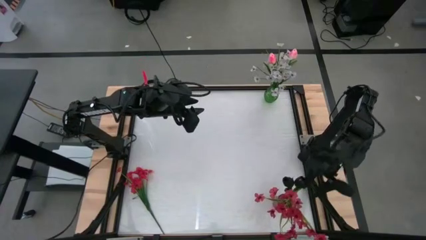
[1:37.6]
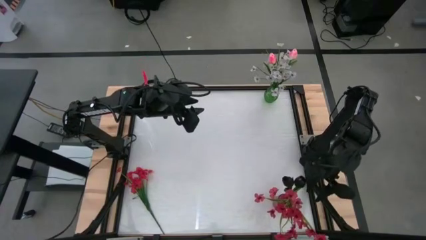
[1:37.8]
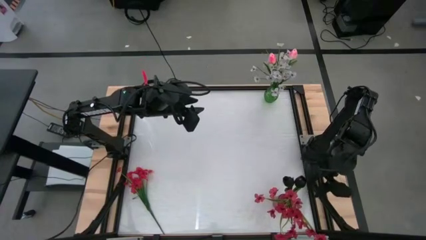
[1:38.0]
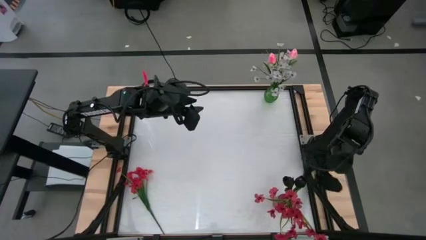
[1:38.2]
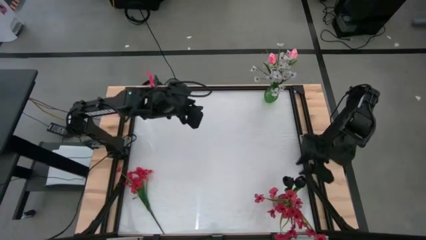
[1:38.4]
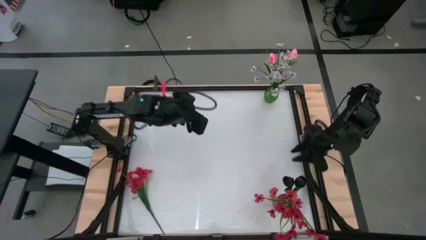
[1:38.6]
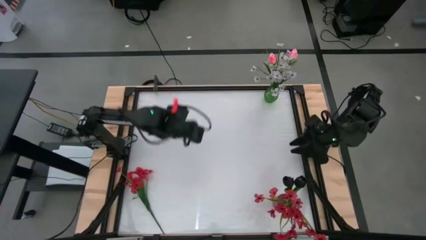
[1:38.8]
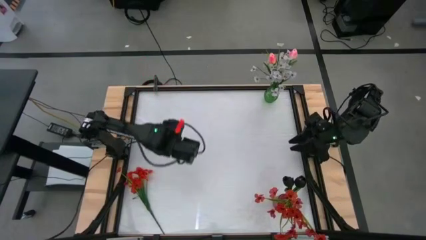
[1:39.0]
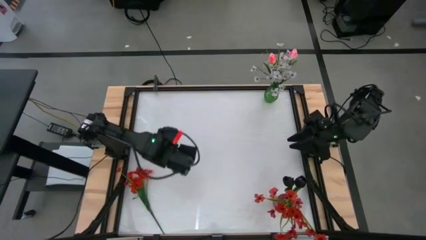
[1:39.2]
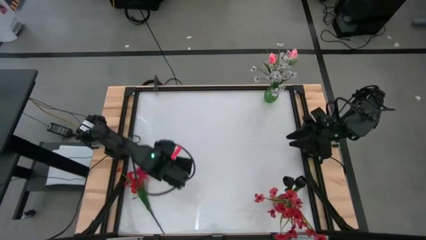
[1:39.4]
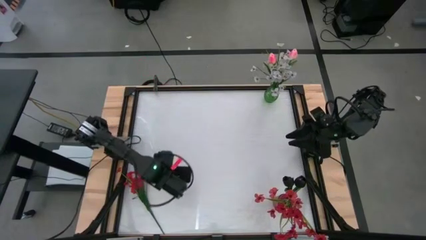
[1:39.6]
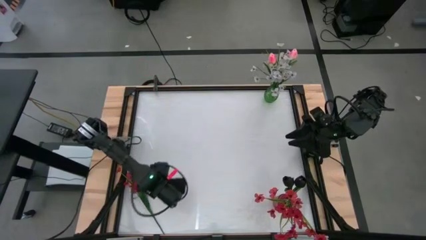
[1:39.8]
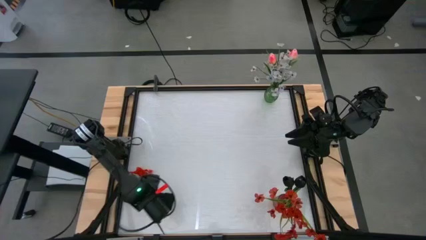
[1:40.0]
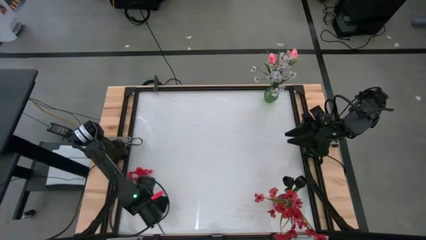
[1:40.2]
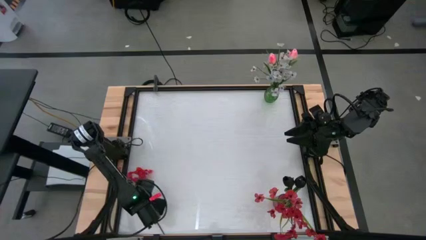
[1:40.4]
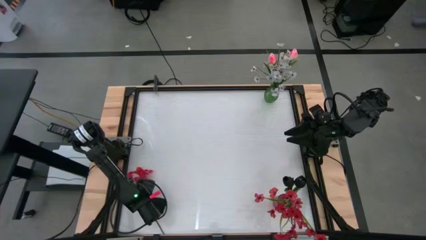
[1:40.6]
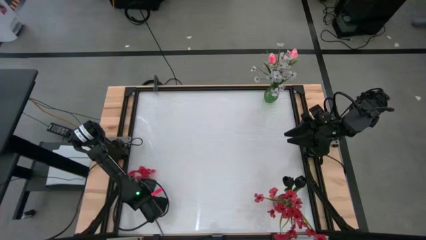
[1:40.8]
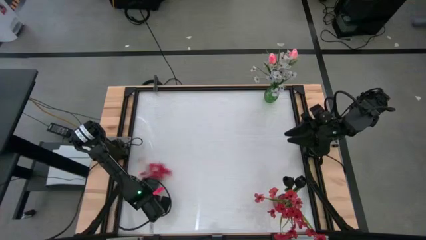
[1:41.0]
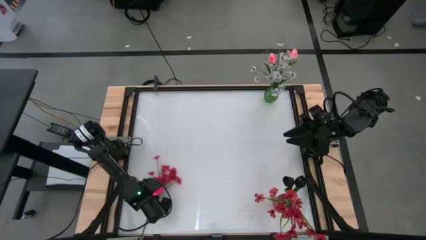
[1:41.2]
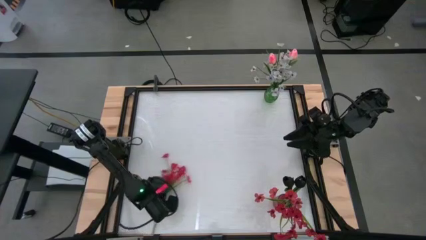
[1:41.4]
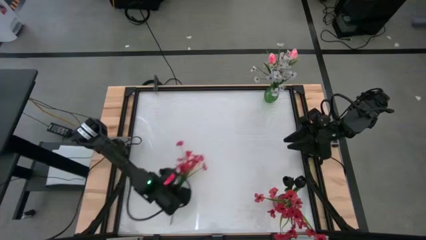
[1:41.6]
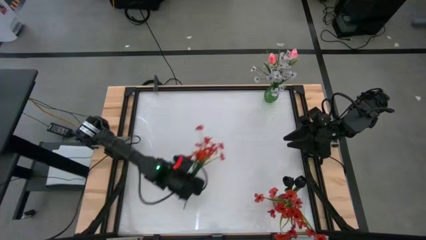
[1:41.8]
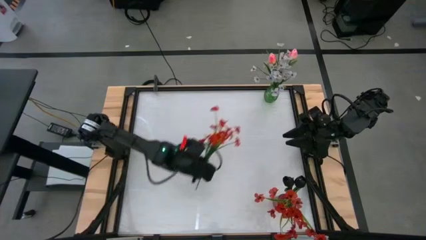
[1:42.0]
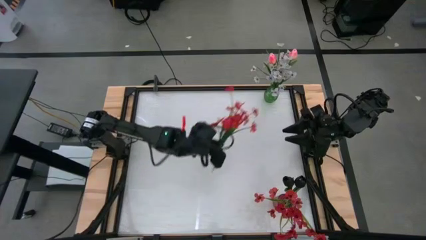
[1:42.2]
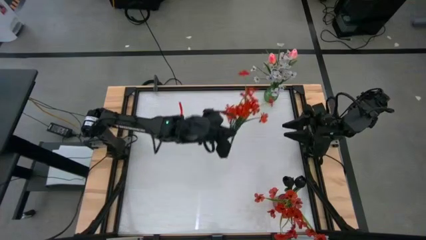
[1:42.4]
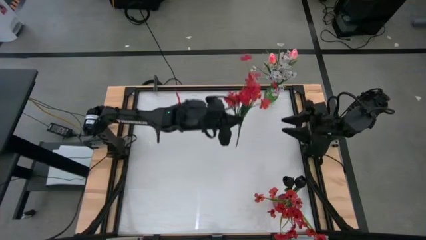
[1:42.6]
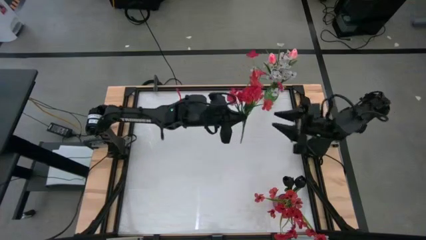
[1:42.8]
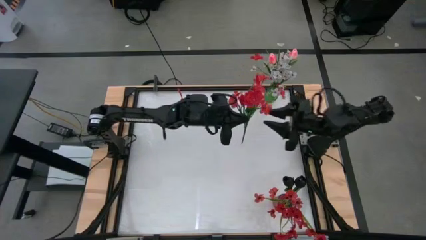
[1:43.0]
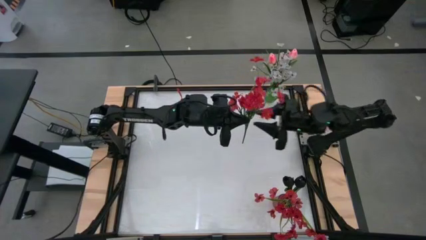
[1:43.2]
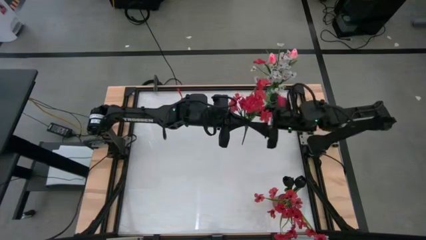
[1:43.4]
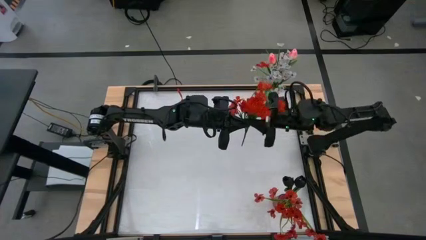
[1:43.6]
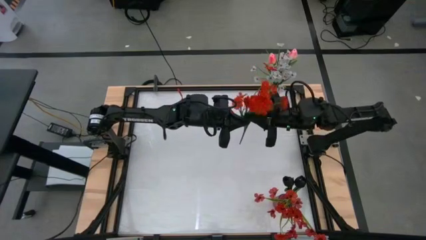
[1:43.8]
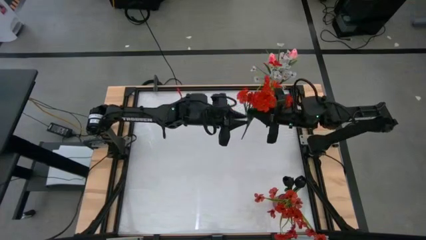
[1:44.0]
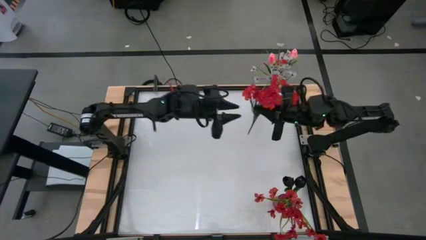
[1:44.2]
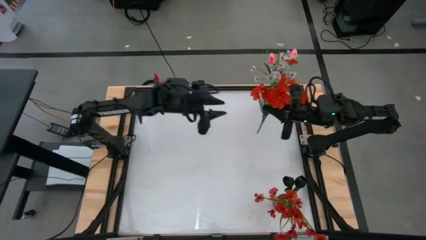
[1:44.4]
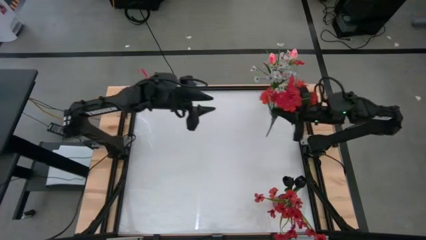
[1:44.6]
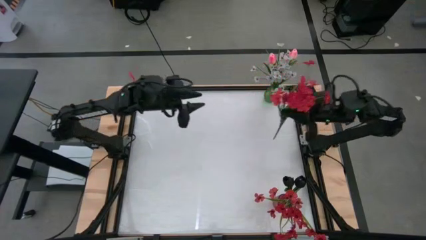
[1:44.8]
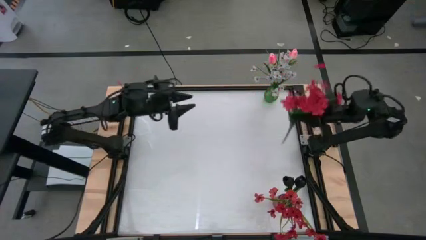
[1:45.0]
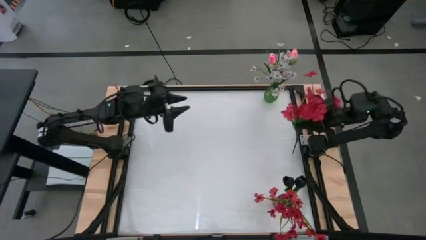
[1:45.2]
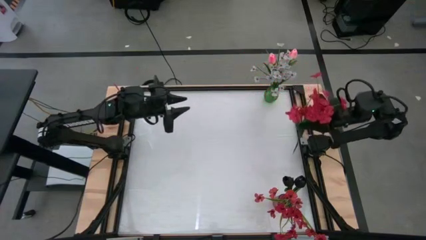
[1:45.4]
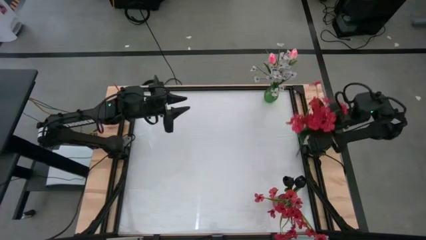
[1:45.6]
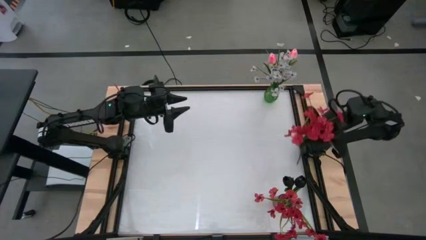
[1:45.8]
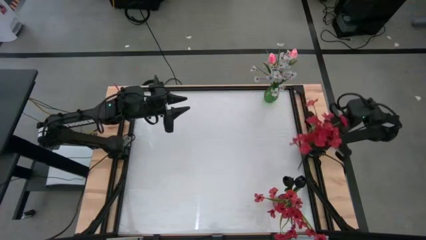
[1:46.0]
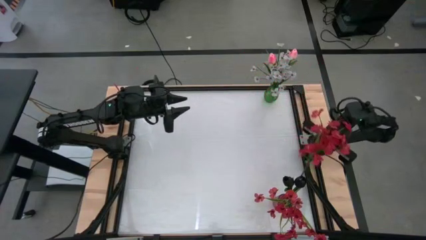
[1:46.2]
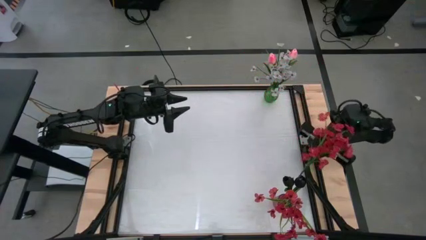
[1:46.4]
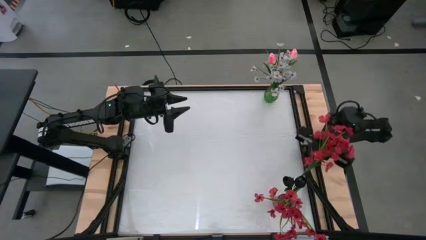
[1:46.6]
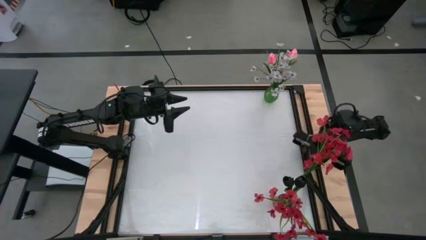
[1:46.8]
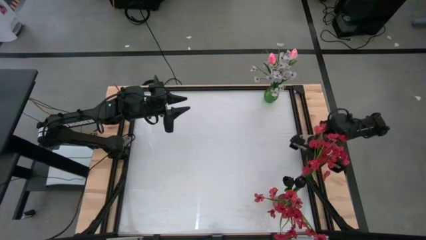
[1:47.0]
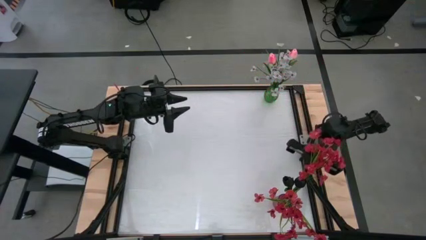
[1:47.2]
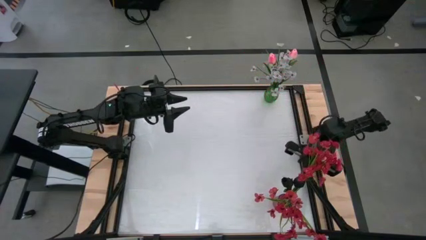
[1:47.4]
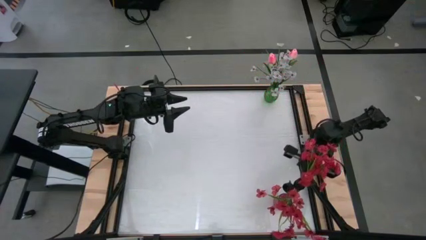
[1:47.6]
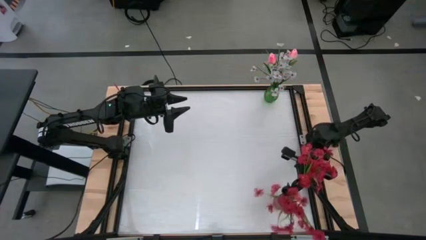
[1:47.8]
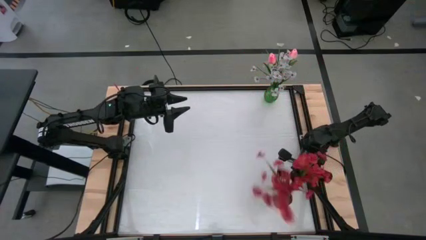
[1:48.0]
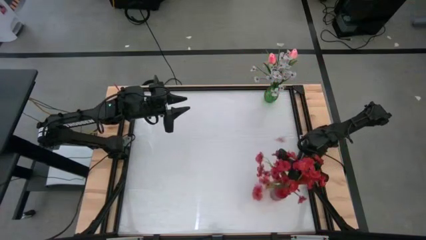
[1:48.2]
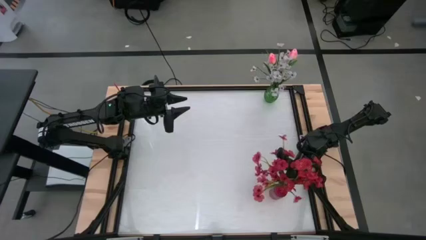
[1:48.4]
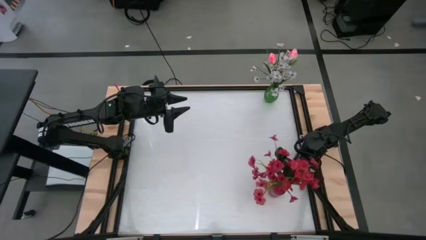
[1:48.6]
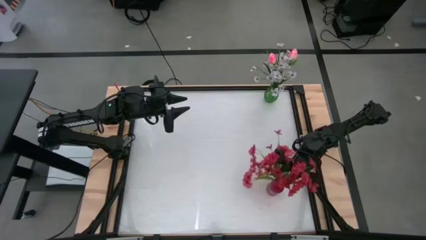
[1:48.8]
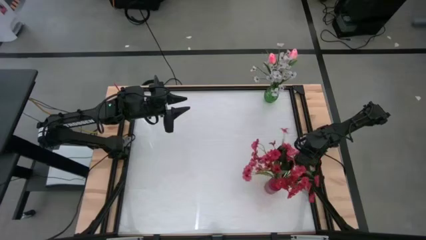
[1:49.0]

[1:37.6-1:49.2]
Task: Sort flowers into vase by color
Put the red flower into the red vase
